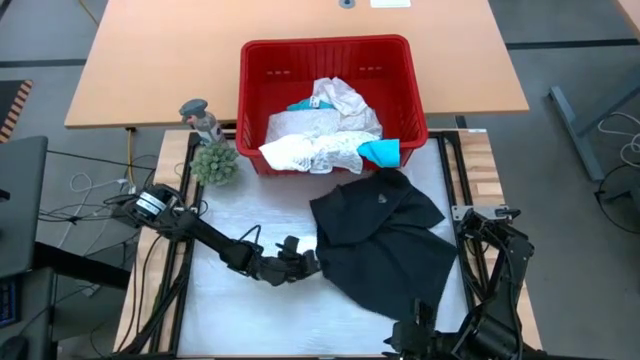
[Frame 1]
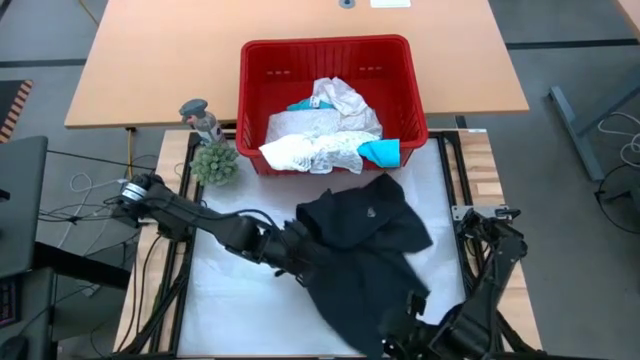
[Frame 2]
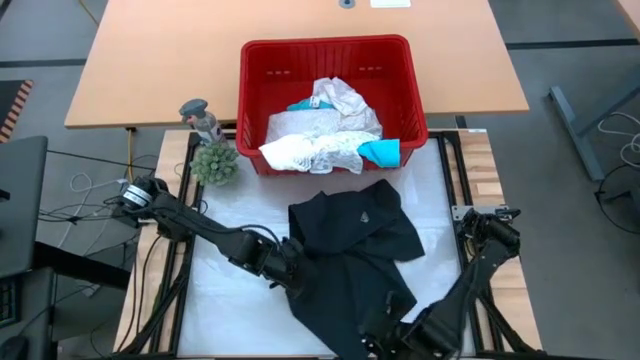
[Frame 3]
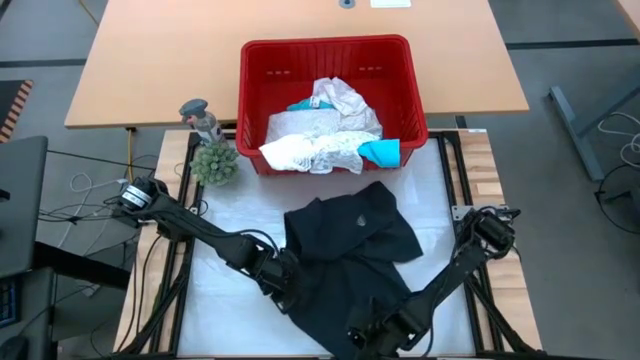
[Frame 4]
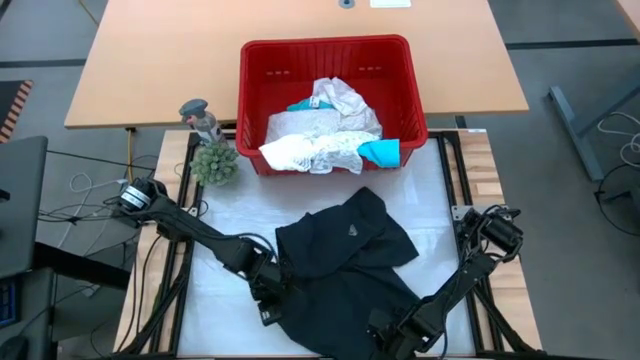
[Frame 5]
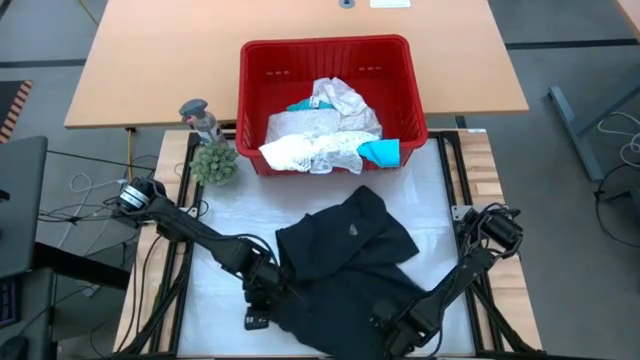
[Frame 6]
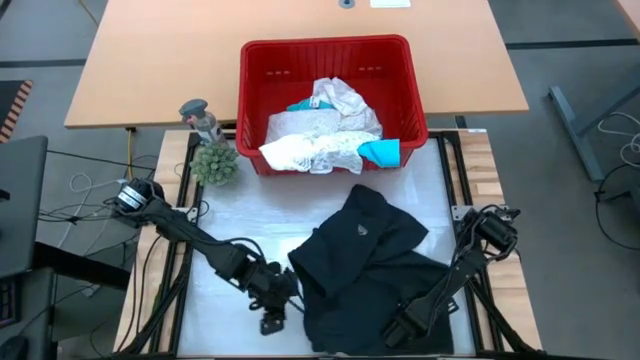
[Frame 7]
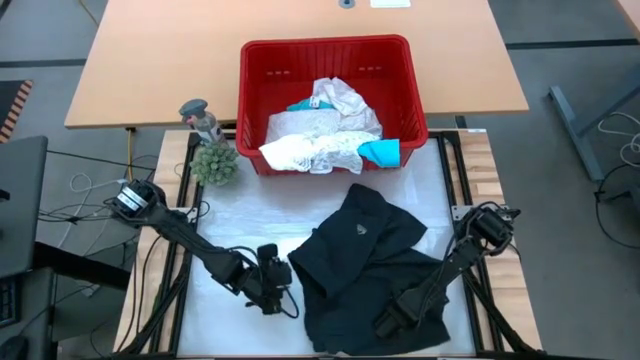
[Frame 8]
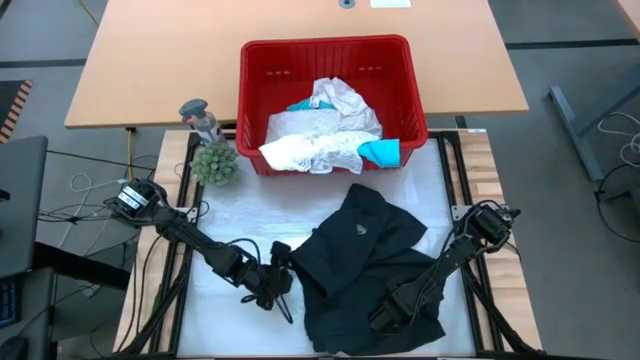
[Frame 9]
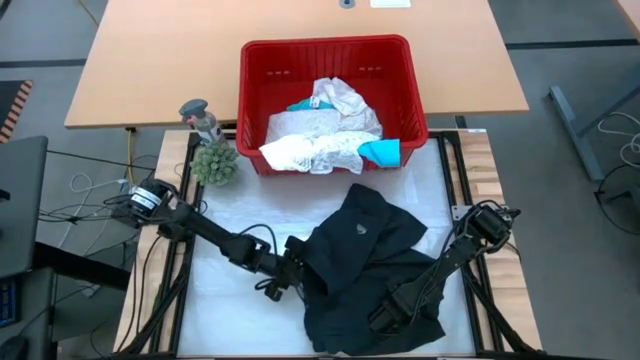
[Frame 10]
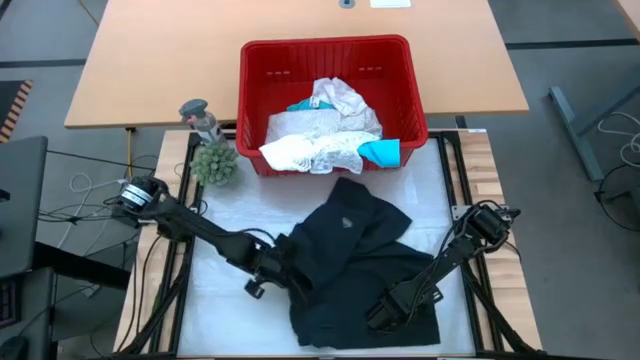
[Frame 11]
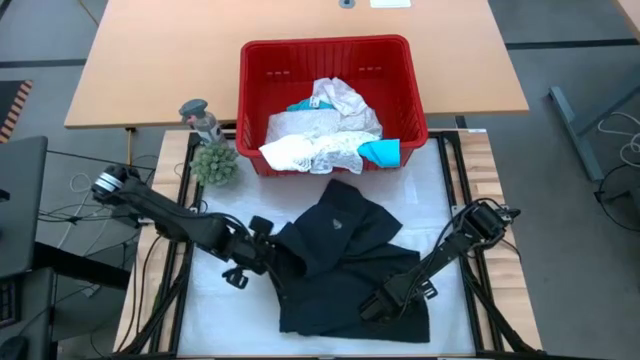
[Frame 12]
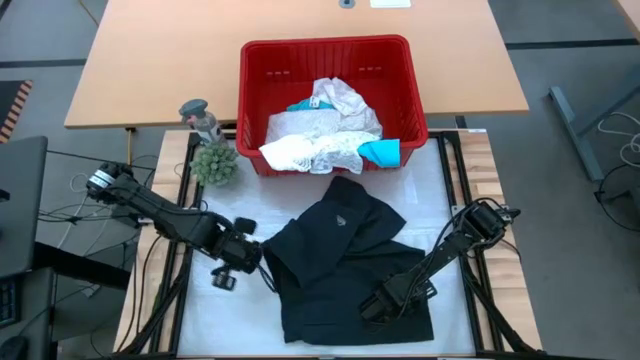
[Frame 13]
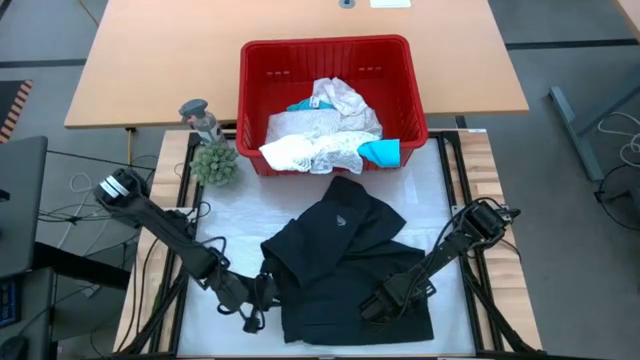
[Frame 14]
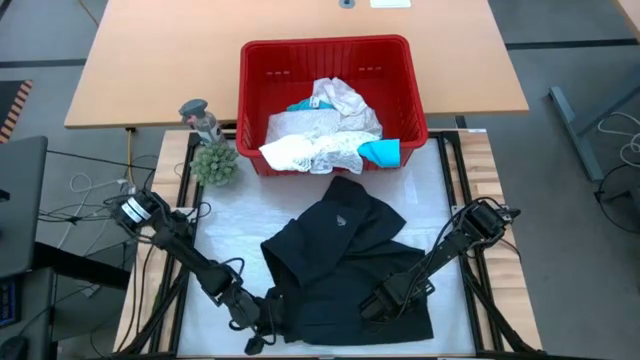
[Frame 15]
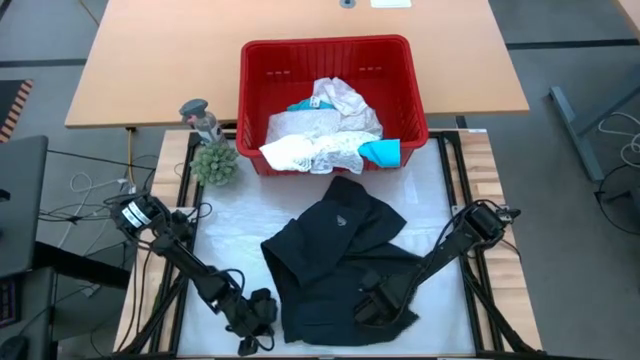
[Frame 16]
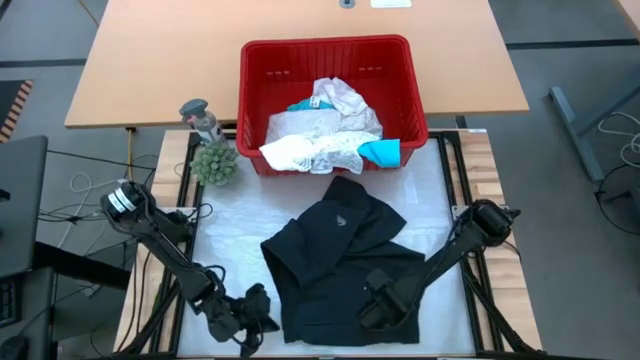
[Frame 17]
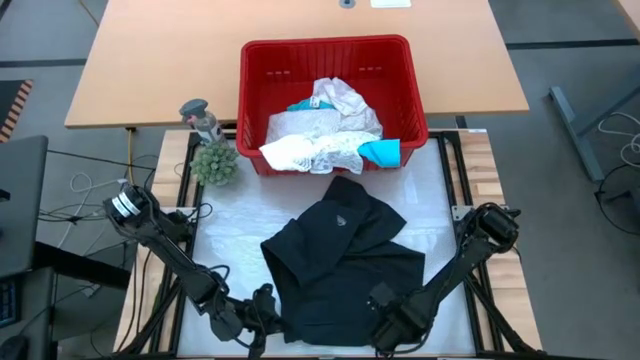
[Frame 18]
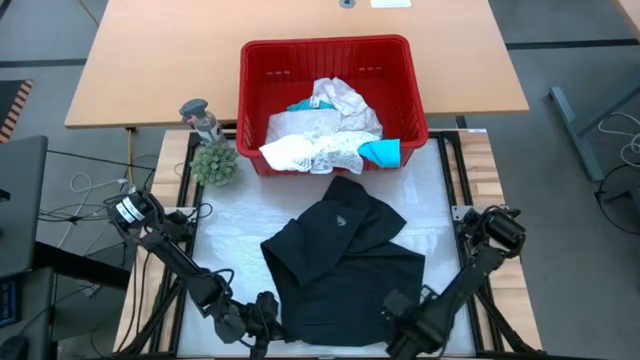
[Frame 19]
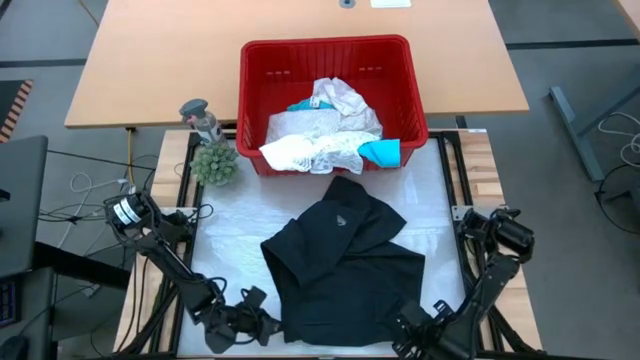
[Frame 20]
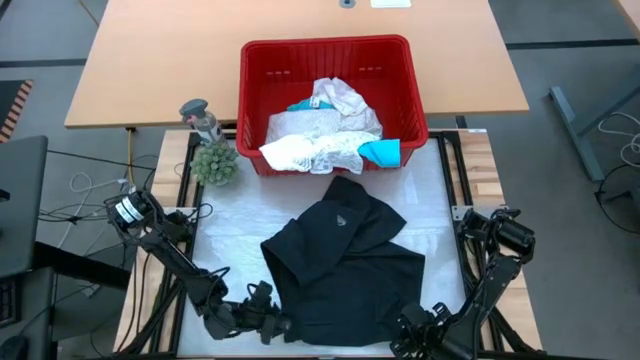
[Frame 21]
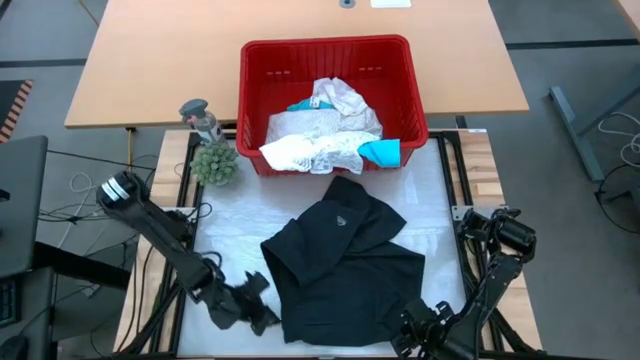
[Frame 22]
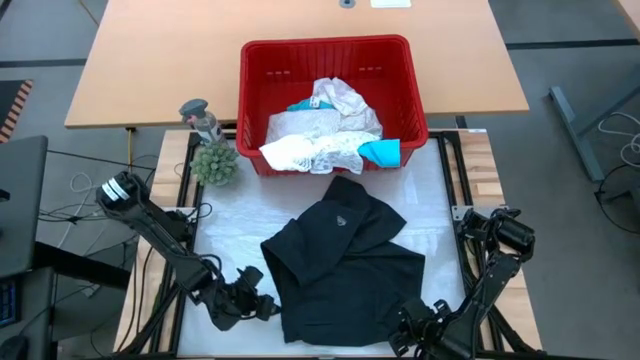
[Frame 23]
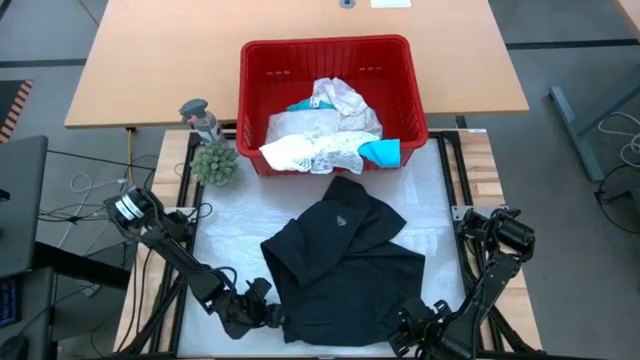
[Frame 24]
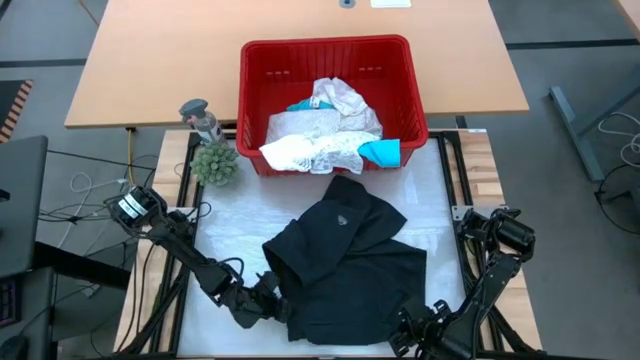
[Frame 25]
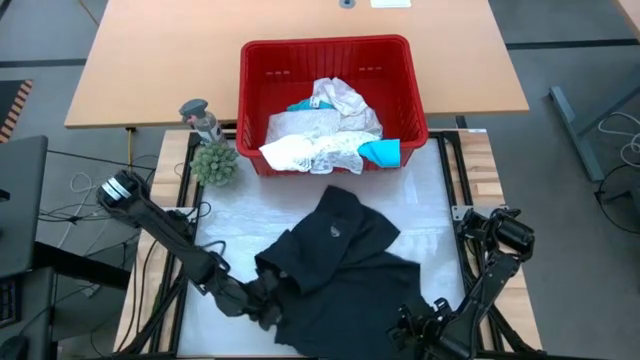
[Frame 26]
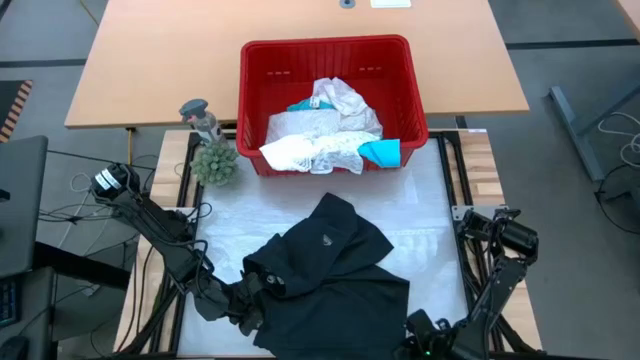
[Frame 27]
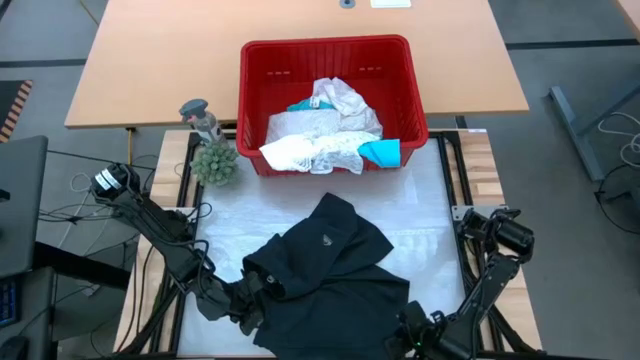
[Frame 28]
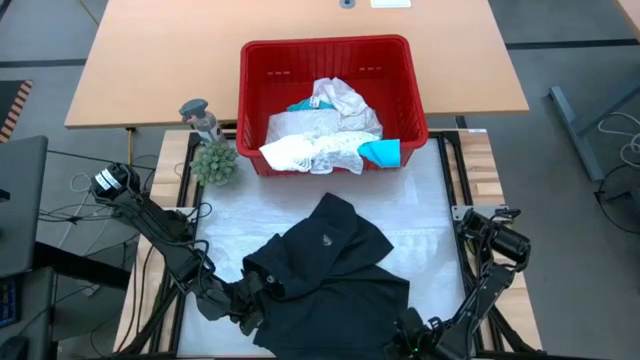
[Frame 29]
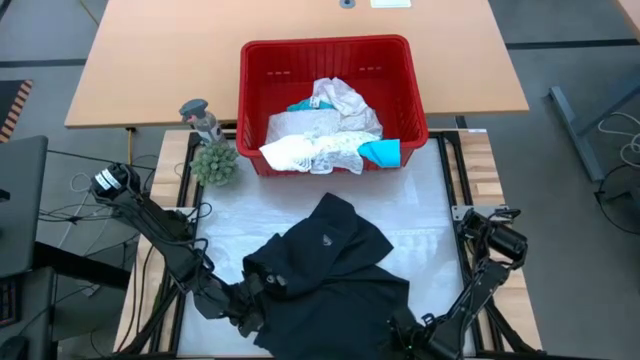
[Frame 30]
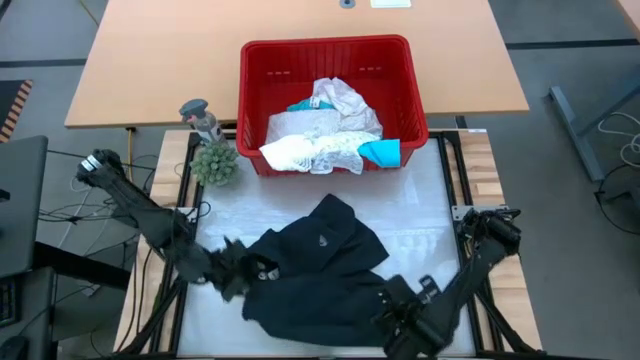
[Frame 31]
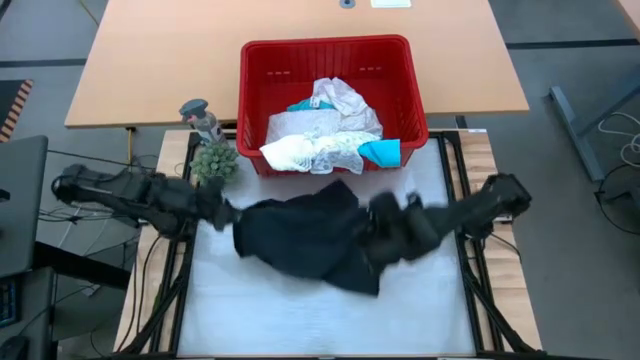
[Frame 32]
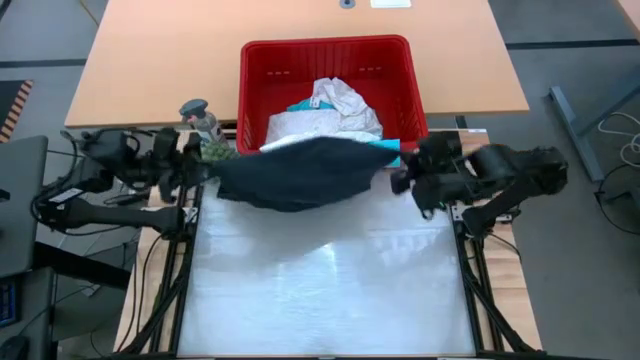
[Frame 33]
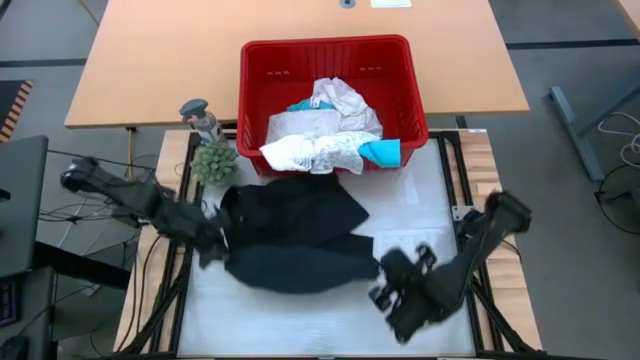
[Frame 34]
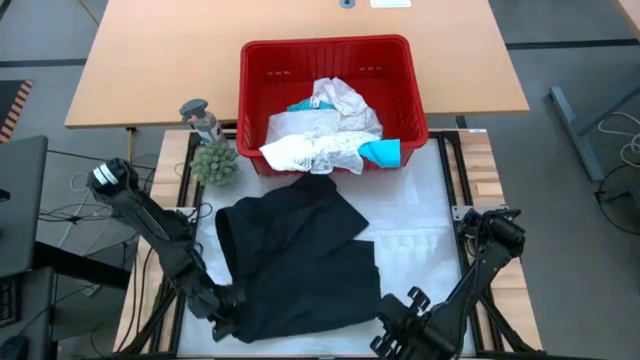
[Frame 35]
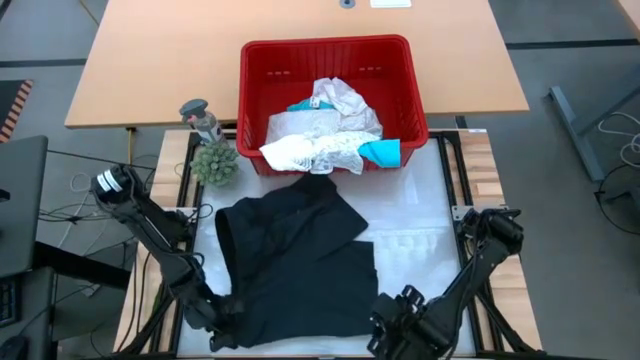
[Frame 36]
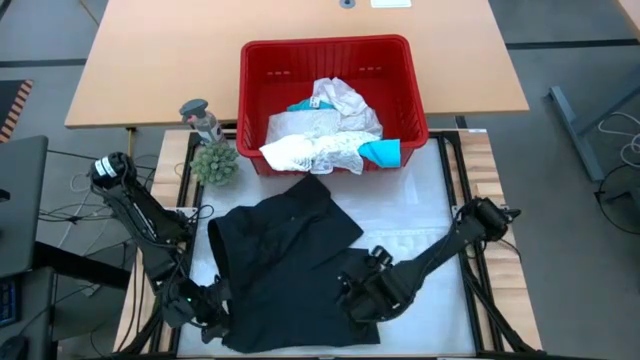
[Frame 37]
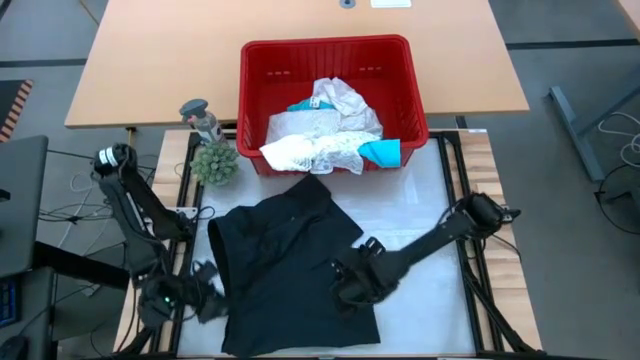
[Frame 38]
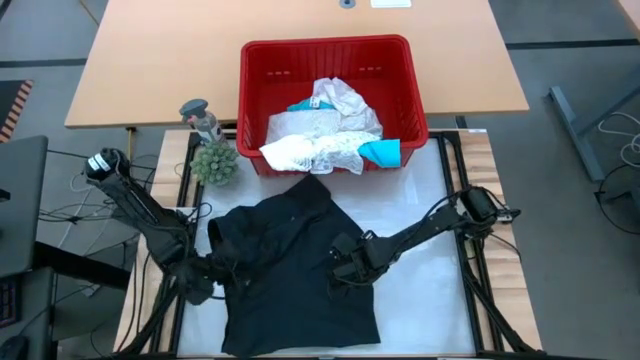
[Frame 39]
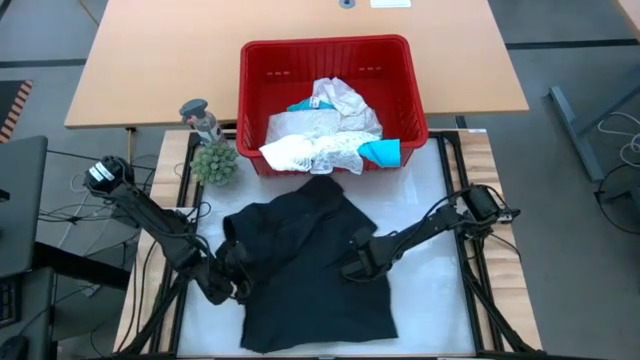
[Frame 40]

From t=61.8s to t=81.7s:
Task: Fold Laundry from Bin
Fold the black shorts
